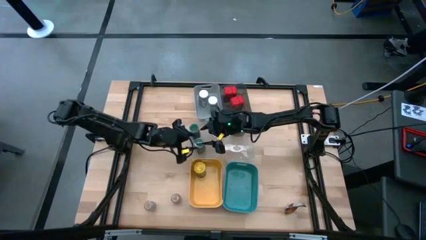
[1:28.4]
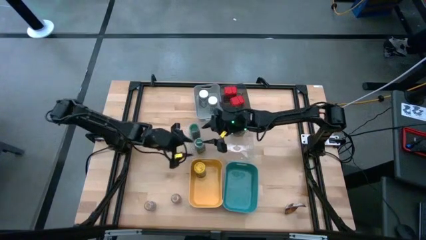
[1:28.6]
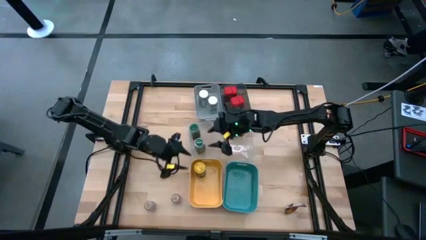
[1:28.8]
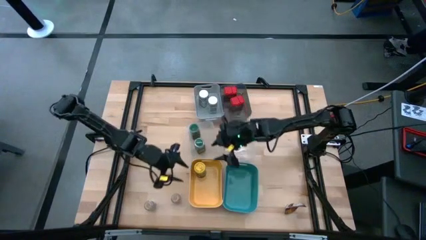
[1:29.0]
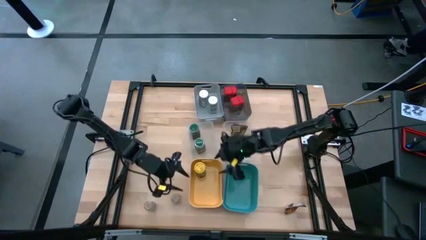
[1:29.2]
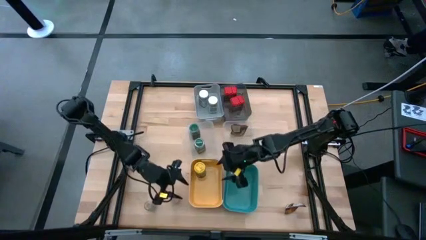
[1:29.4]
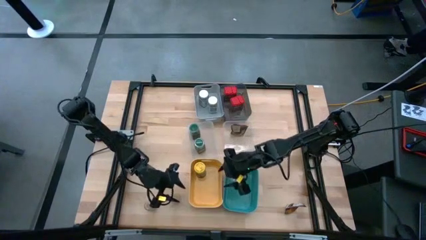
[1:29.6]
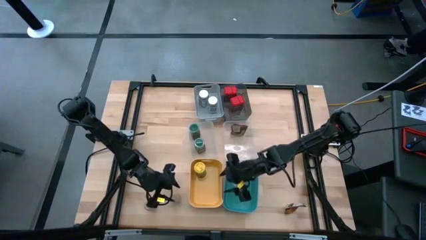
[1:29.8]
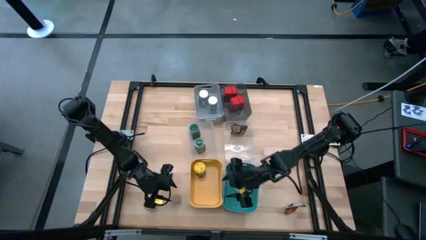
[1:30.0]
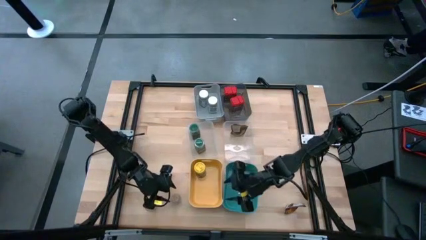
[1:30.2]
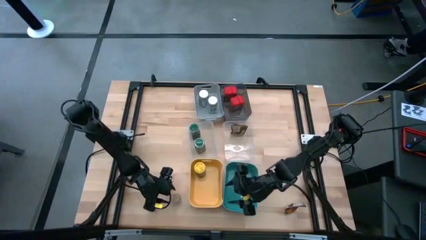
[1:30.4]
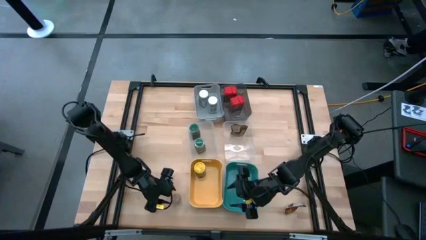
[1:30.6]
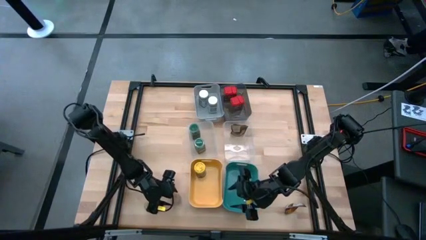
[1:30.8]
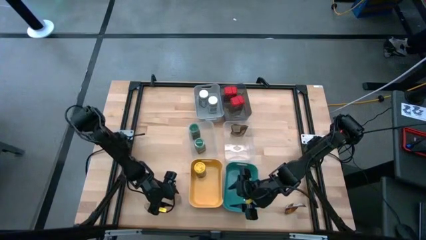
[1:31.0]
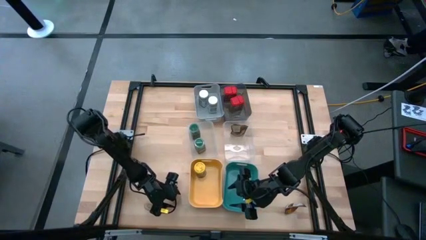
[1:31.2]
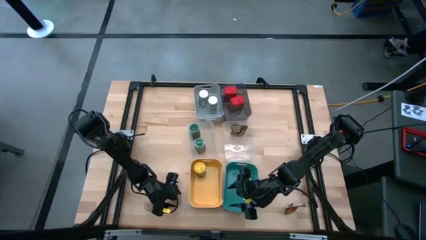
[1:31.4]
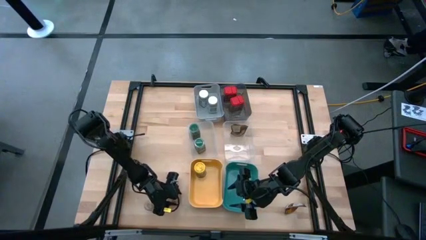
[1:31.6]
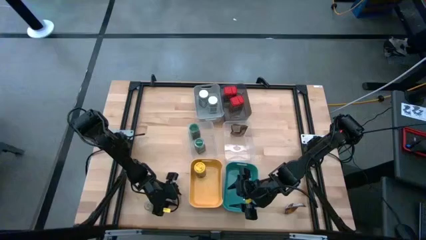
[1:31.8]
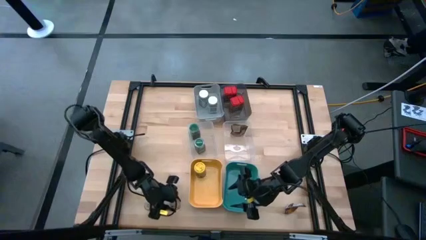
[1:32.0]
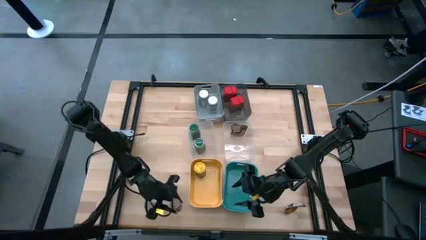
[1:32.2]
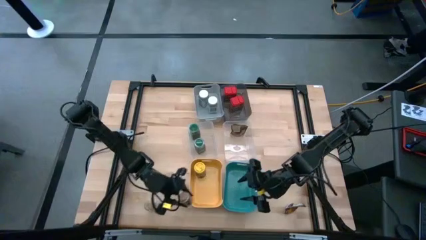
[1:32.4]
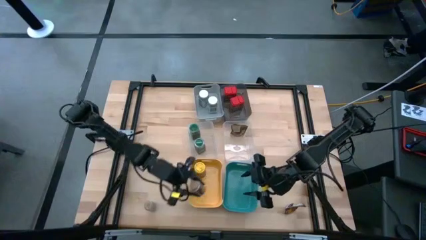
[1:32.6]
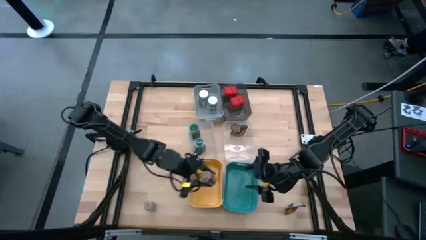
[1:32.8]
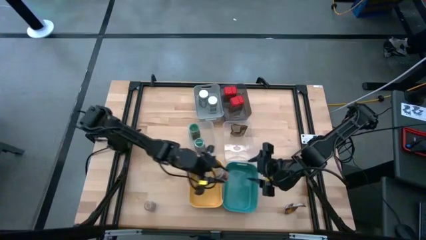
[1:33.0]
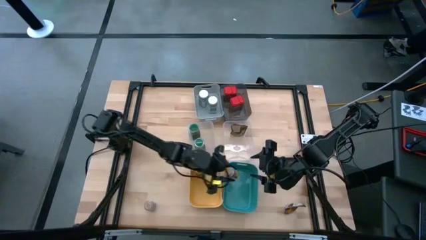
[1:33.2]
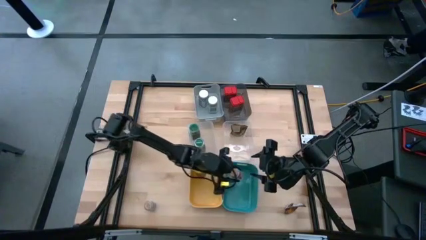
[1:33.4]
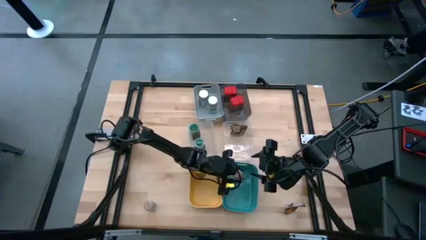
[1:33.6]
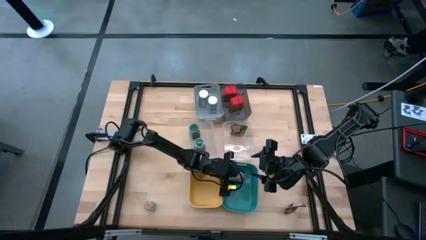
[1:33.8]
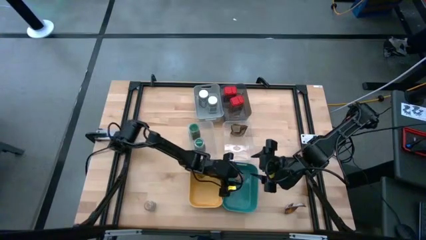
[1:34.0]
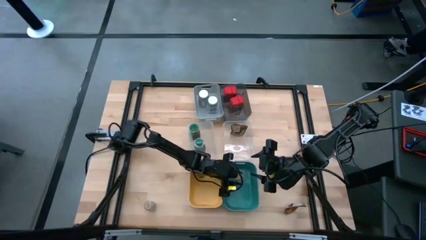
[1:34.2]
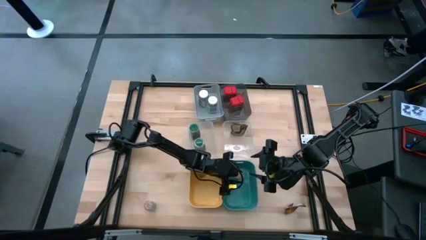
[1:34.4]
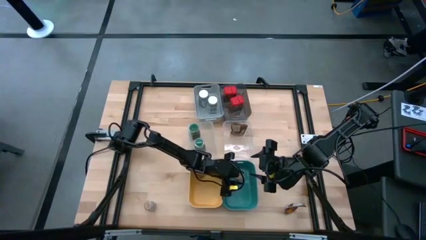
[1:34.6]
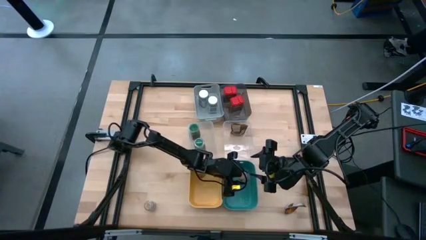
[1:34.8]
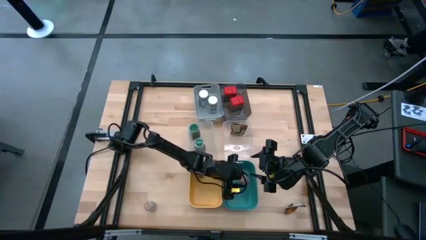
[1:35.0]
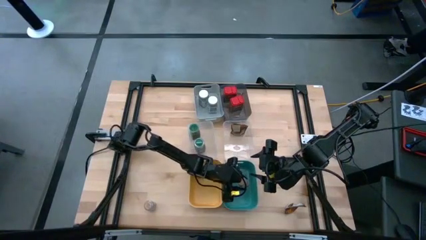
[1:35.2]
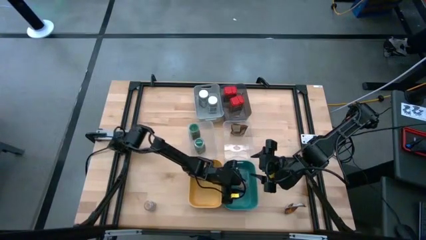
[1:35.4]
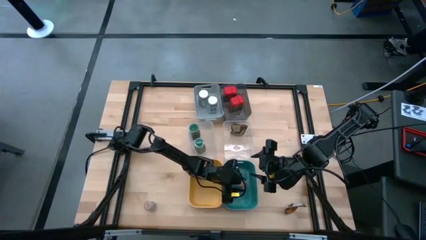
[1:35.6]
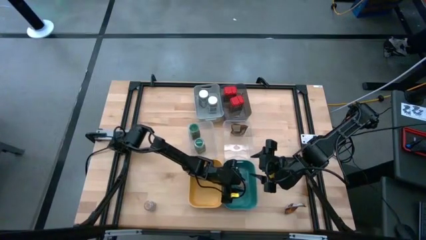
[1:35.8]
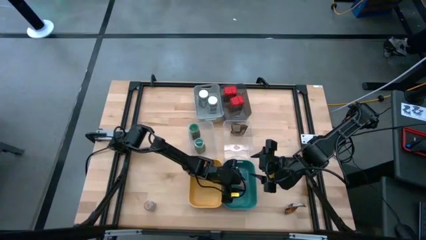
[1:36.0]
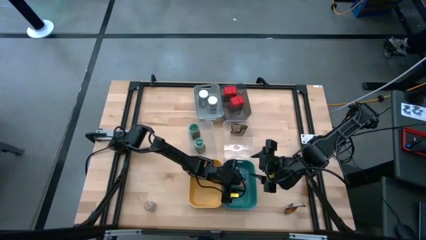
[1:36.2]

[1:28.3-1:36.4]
Task: Sort spices by type
Put the top brown seasoning bottle into the blue bin

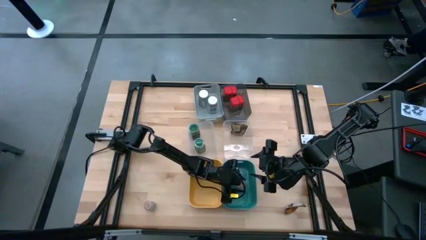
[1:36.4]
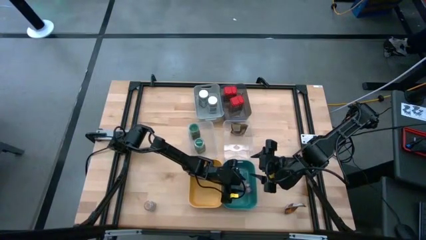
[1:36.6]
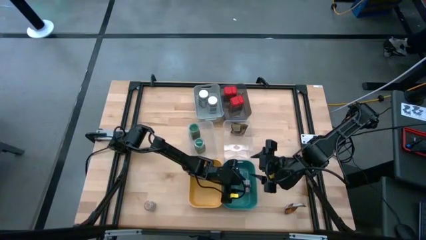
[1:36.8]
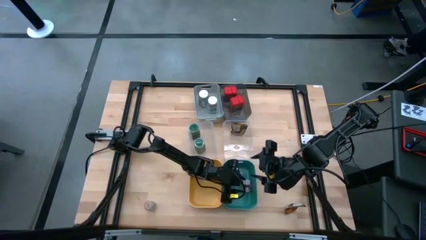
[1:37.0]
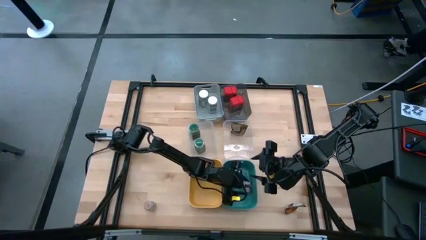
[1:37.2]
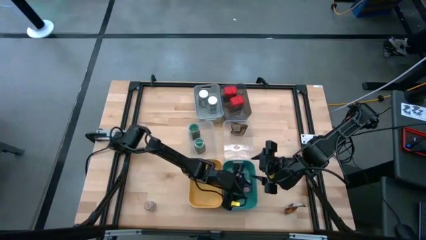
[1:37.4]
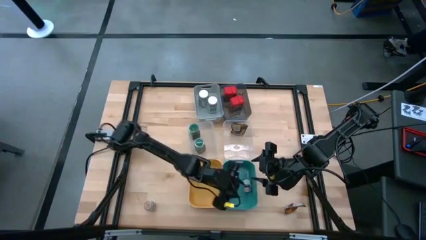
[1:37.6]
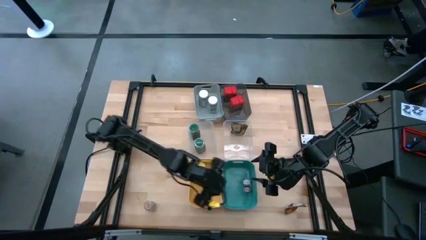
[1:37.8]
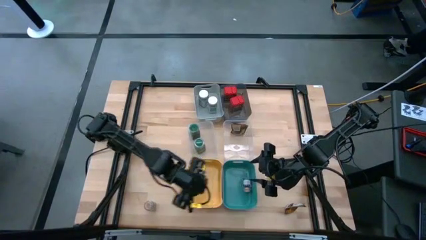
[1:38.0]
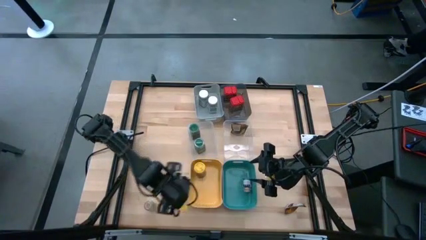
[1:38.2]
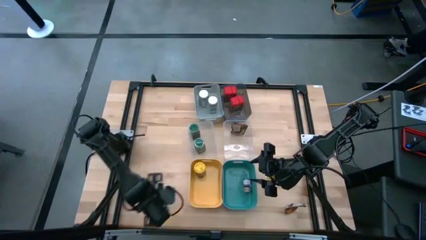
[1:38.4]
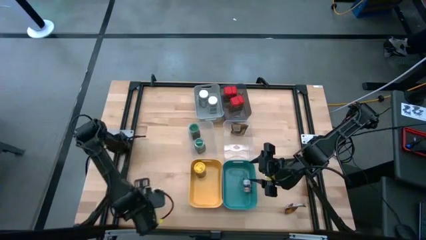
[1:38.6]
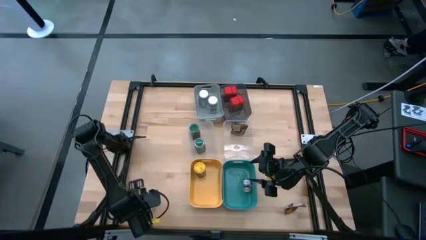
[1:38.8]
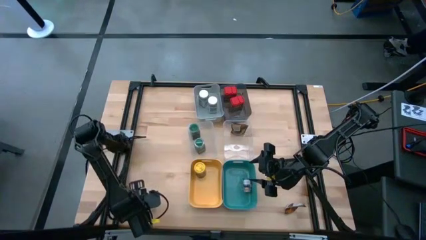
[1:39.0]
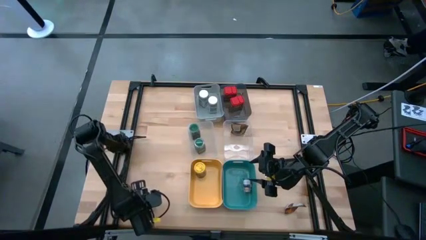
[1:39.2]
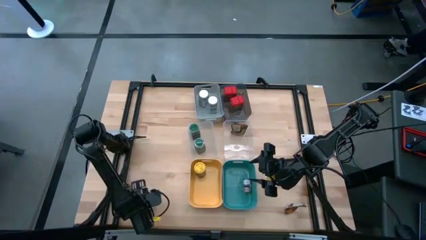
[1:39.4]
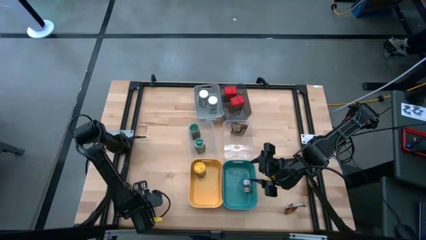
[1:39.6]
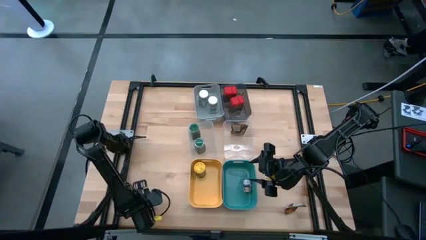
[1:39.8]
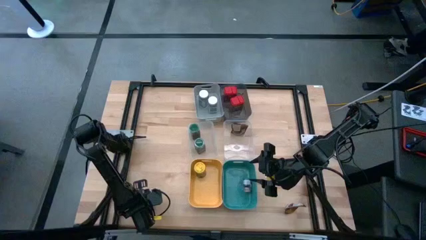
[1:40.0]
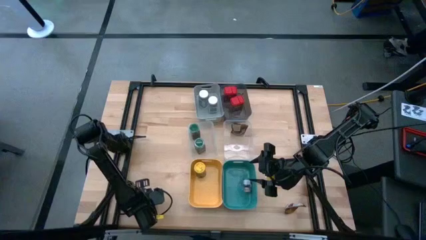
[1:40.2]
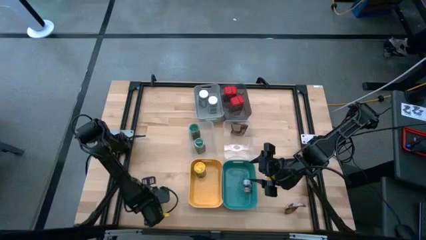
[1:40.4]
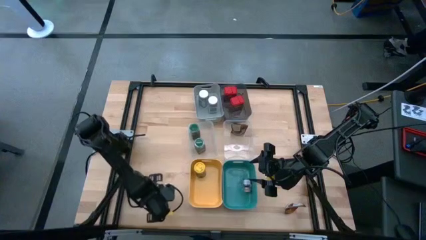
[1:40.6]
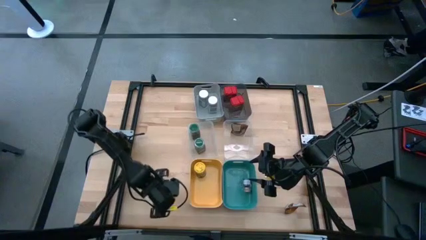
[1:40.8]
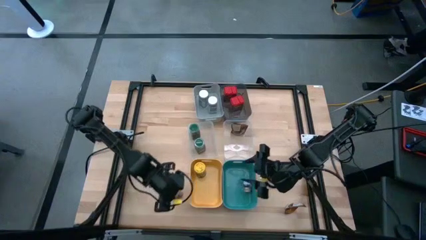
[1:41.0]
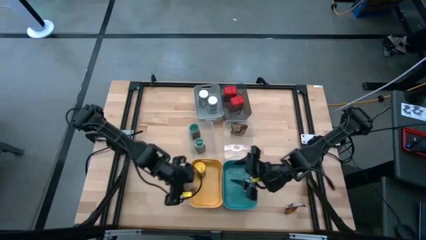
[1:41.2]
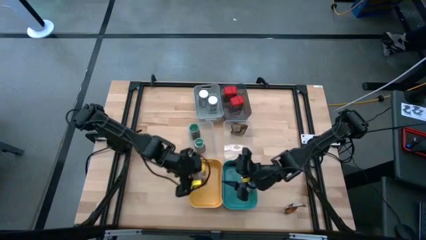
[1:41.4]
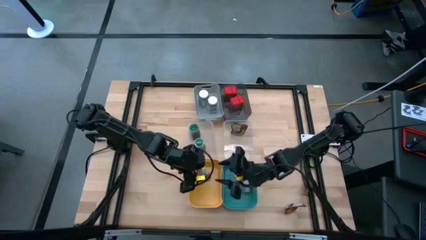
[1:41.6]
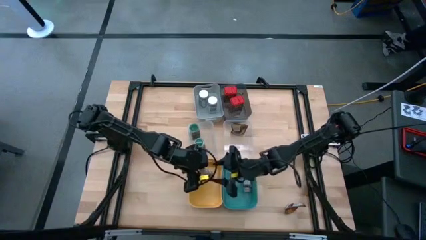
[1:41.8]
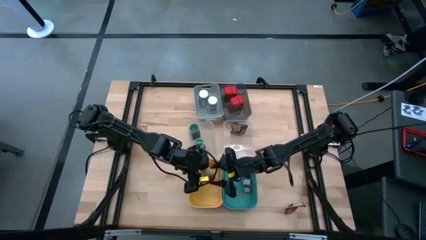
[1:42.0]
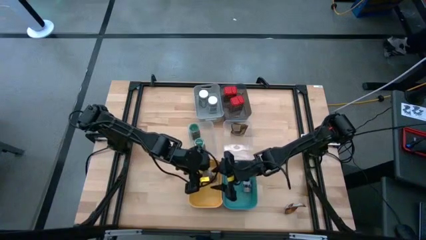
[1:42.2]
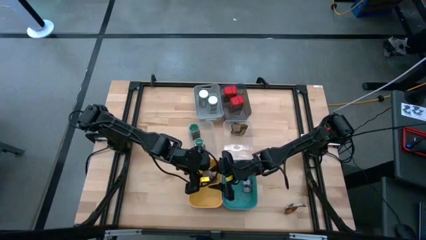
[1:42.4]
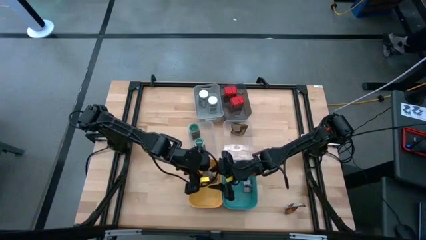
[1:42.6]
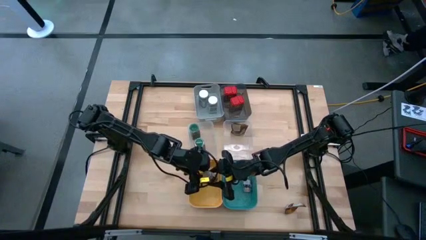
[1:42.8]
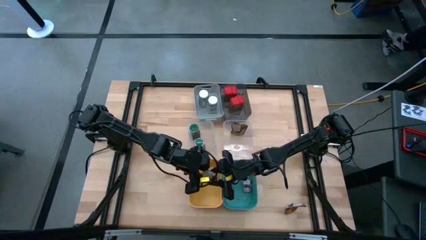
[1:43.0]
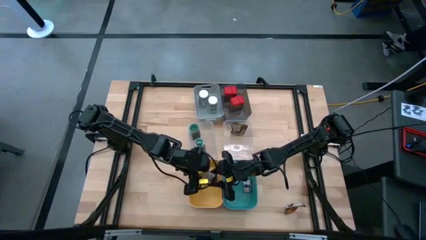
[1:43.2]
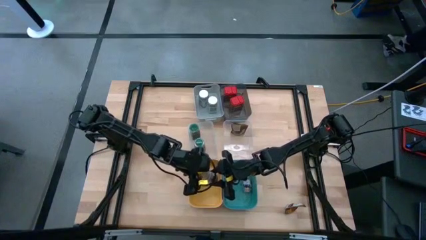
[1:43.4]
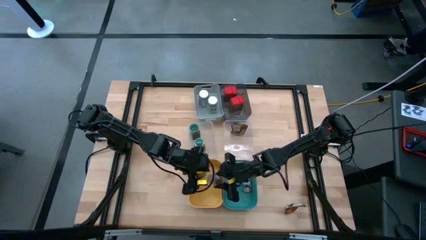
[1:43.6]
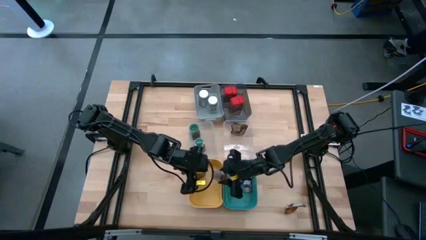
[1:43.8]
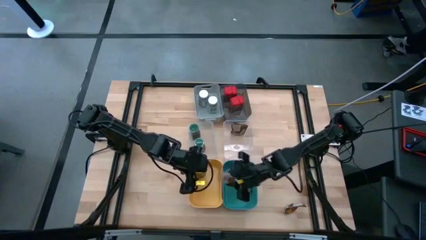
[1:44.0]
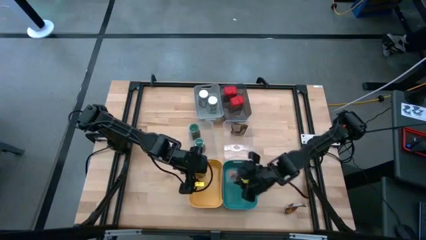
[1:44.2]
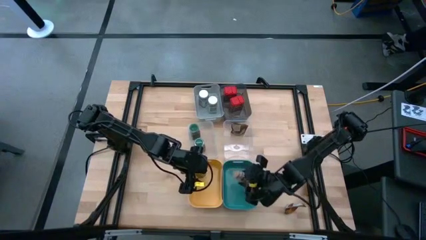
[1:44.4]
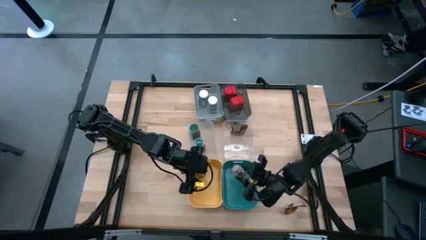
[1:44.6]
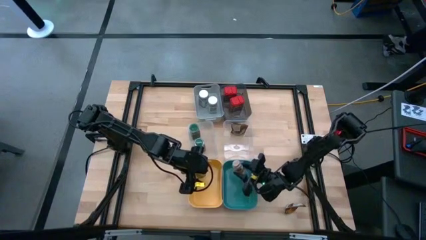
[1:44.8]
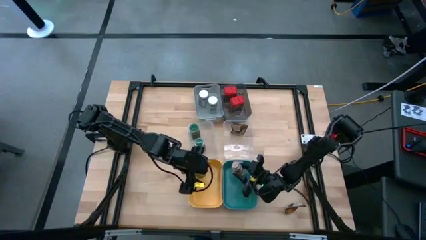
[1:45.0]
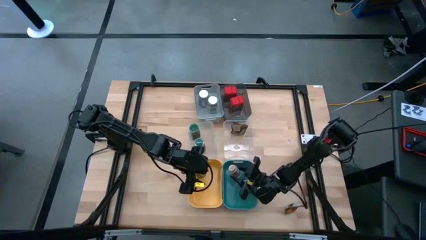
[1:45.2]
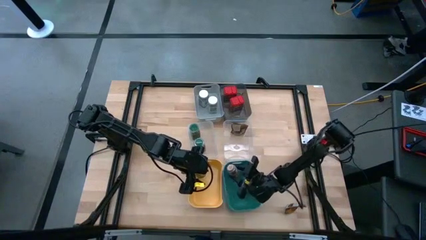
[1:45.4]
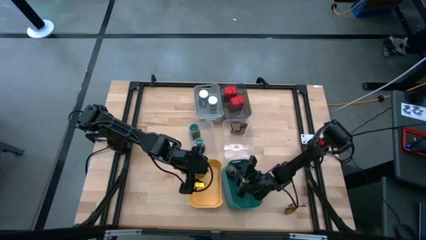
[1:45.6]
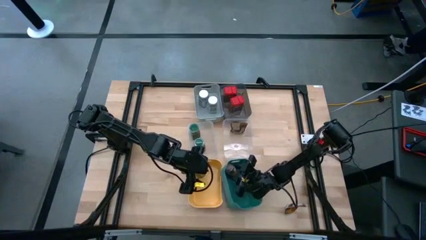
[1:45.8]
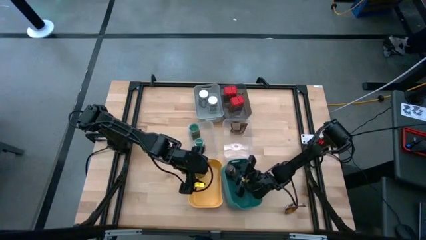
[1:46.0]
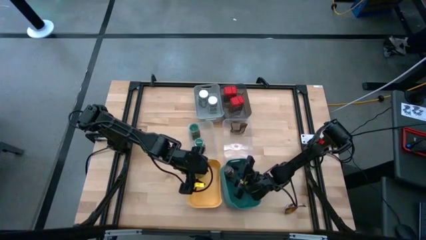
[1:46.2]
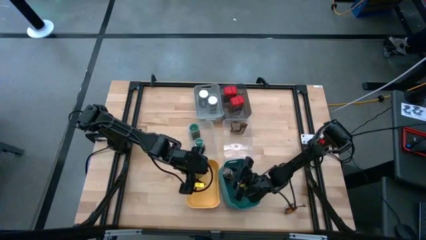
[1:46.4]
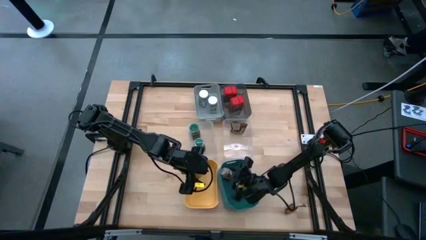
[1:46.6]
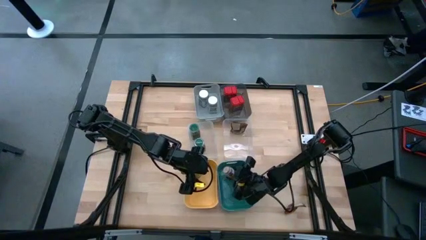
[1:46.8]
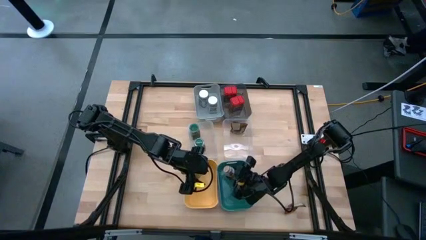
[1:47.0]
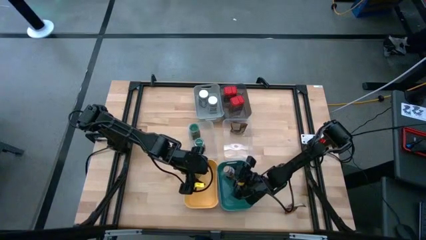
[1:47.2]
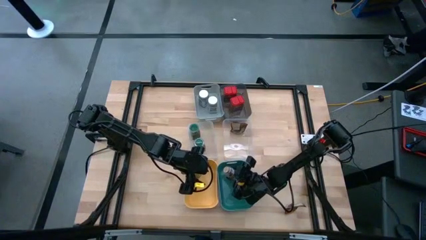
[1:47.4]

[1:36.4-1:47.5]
Put the brown seasoning bottle into the blue bin
